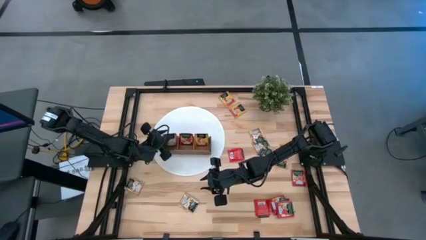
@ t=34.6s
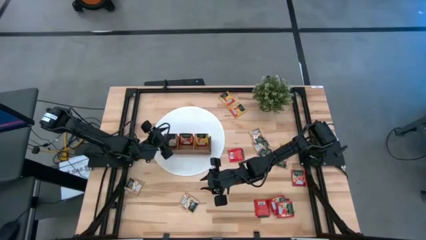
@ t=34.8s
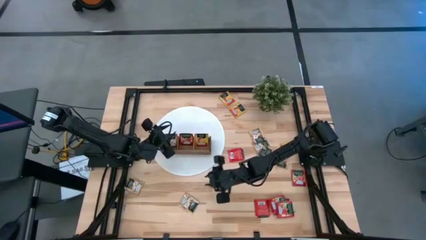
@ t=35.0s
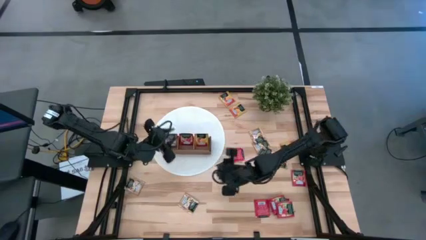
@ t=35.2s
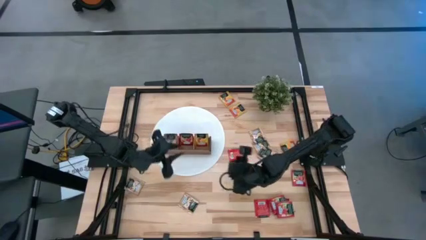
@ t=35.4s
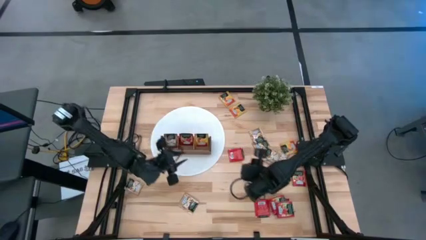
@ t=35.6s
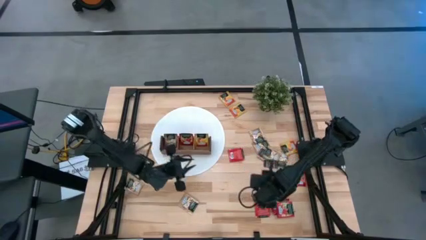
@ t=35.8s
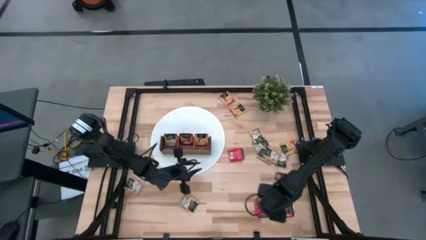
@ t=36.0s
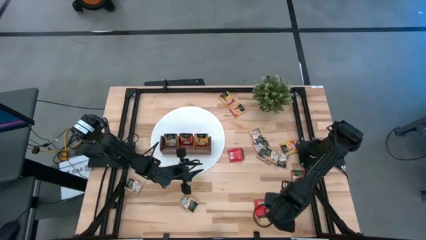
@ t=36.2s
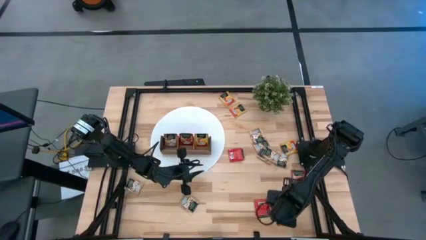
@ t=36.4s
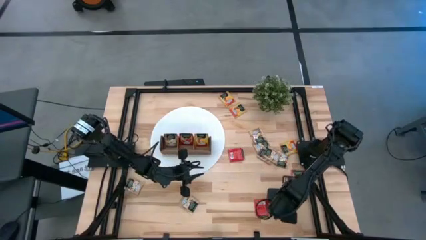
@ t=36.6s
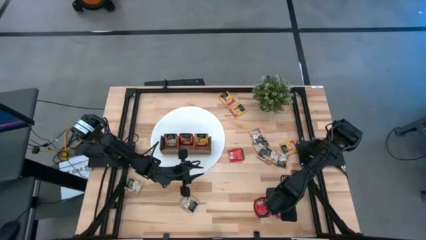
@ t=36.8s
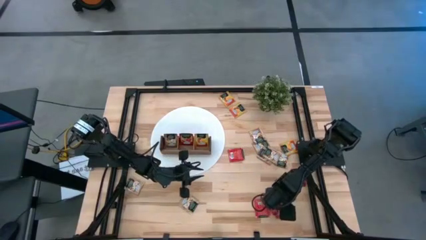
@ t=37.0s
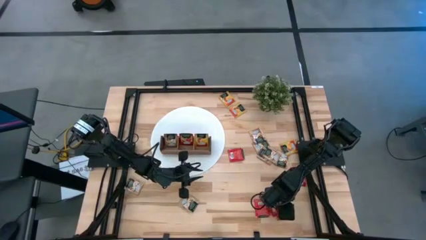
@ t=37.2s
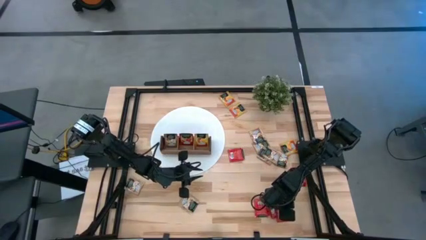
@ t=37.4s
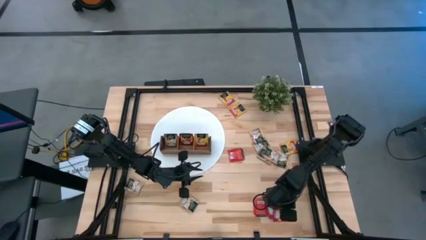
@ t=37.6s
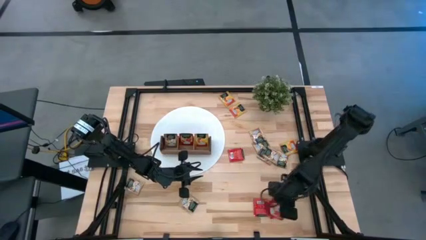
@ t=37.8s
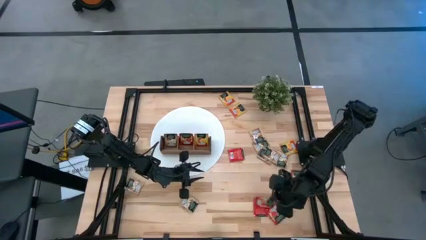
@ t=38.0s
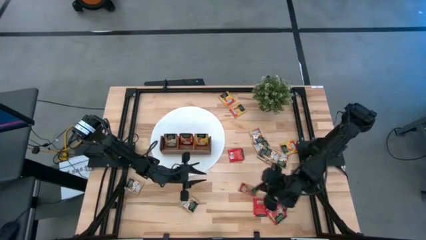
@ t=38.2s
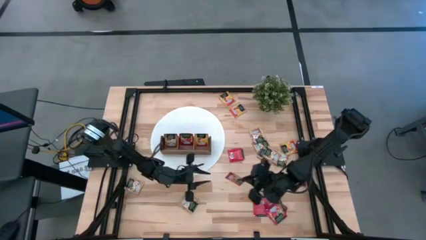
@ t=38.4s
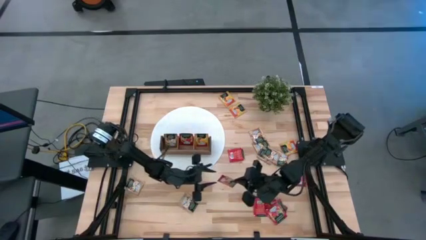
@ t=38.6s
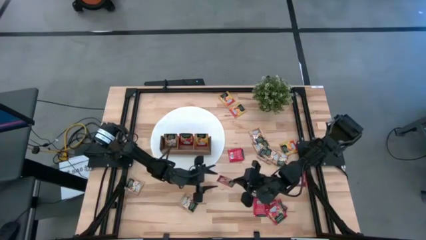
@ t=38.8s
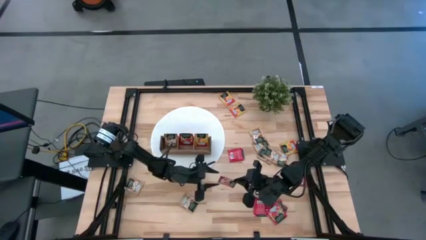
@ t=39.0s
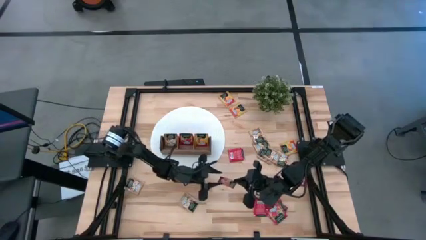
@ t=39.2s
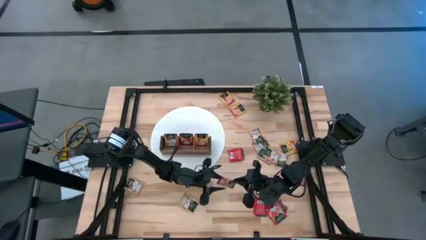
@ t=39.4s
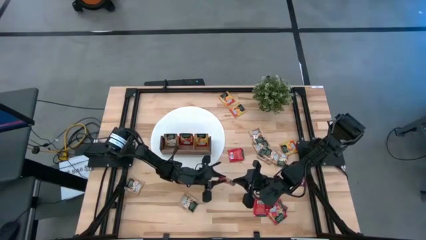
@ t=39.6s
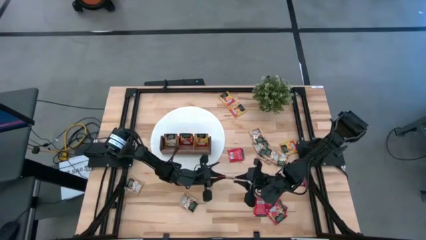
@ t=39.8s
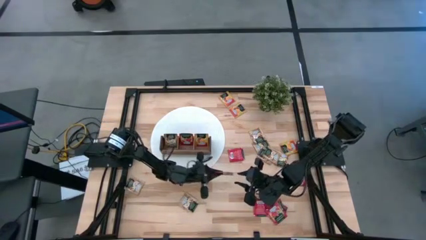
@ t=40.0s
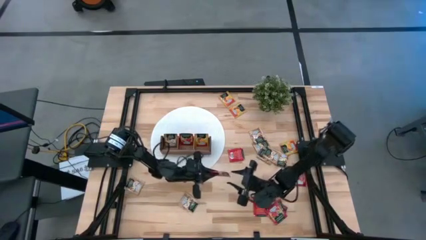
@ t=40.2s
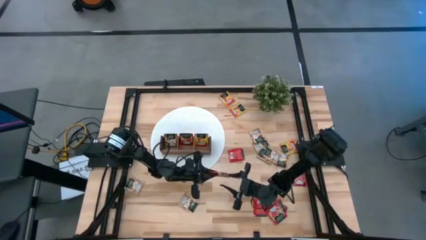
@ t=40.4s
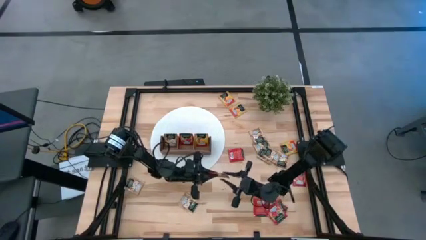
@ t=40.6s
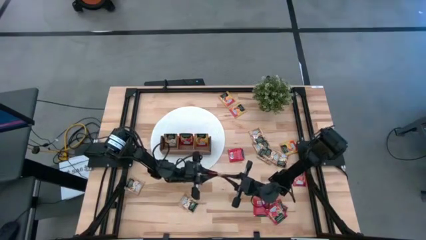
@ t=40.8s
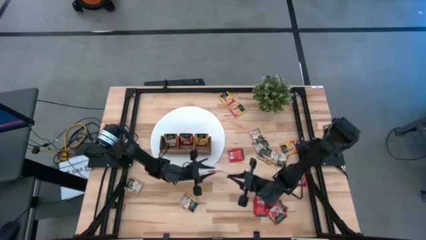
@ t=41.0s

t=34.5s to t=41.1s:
Task: Pick & Place Tea
Put the red tea bag into the middle section of the wooden organizer

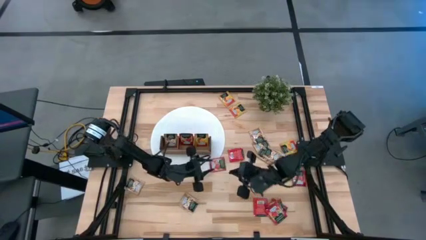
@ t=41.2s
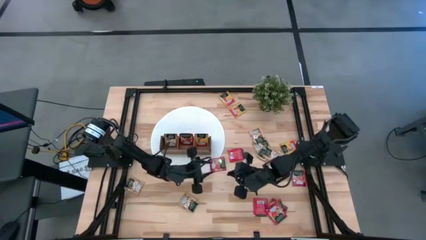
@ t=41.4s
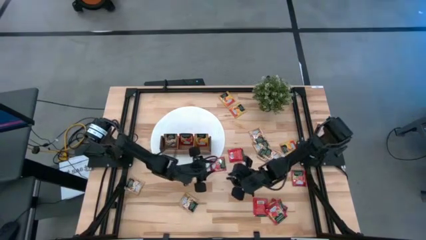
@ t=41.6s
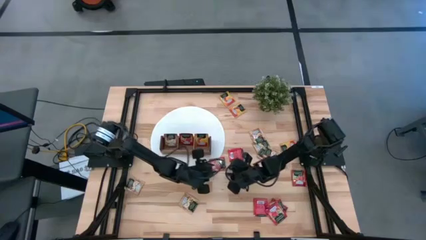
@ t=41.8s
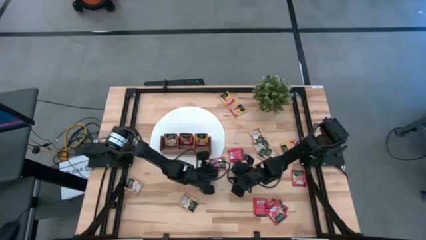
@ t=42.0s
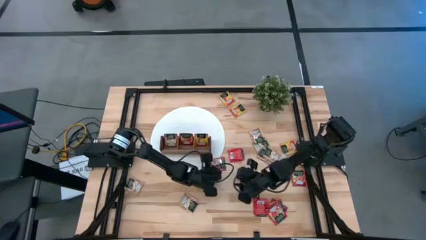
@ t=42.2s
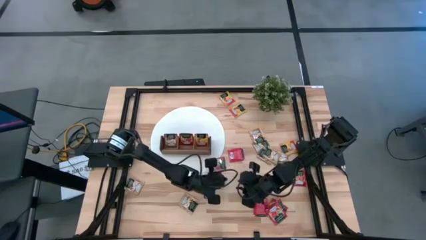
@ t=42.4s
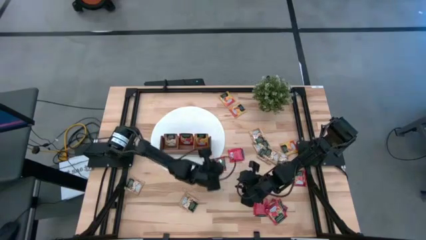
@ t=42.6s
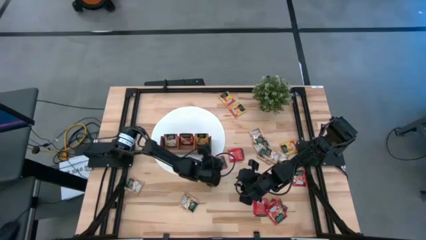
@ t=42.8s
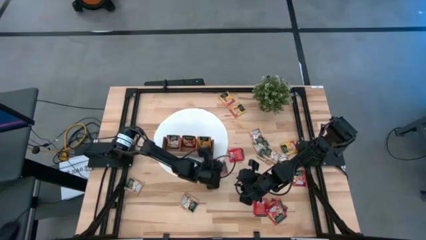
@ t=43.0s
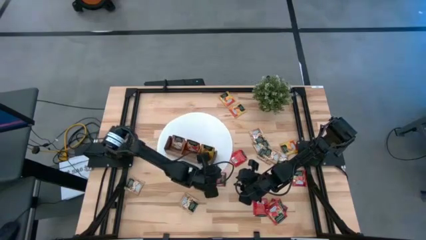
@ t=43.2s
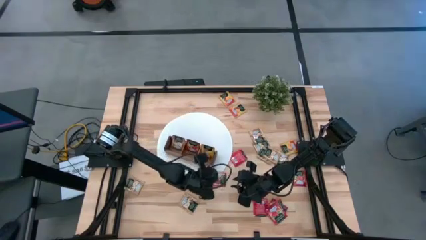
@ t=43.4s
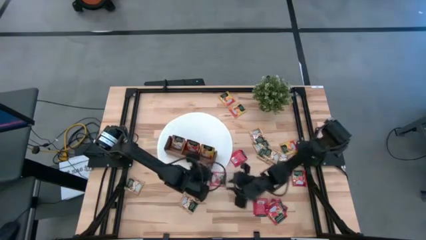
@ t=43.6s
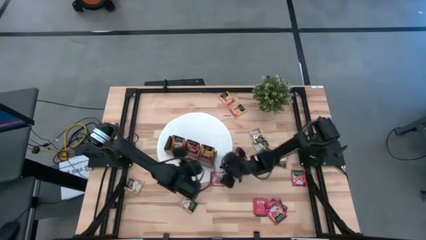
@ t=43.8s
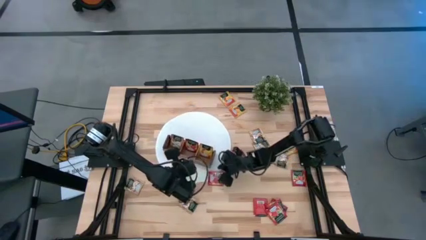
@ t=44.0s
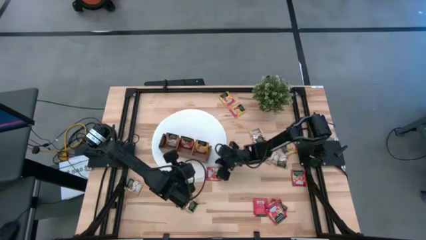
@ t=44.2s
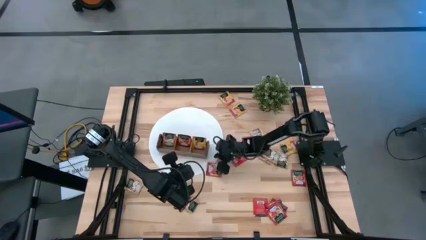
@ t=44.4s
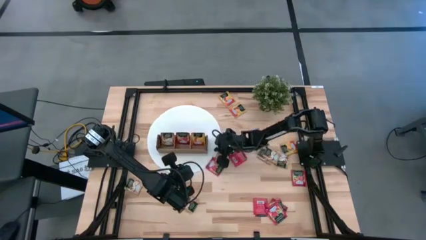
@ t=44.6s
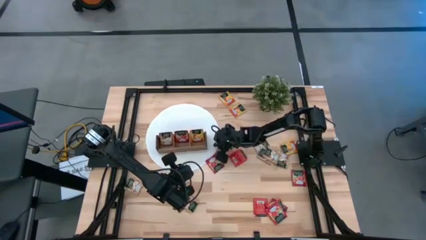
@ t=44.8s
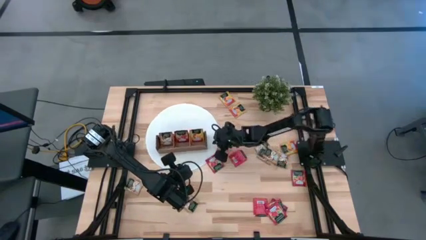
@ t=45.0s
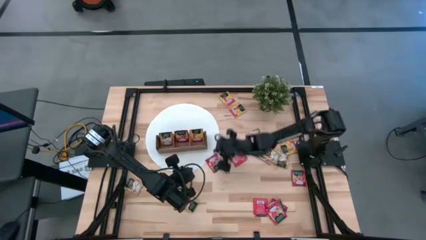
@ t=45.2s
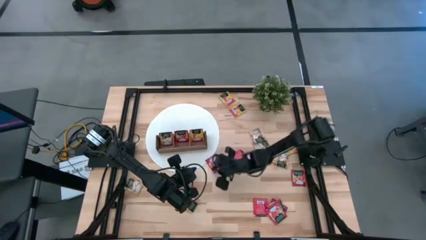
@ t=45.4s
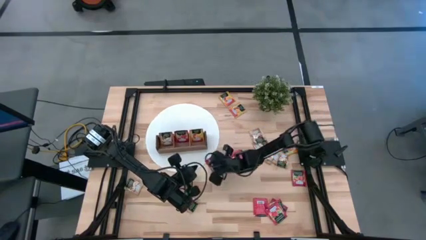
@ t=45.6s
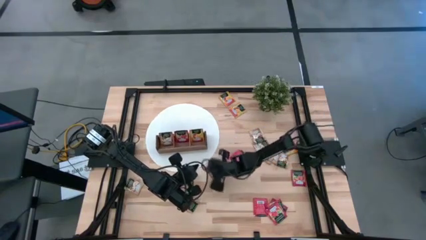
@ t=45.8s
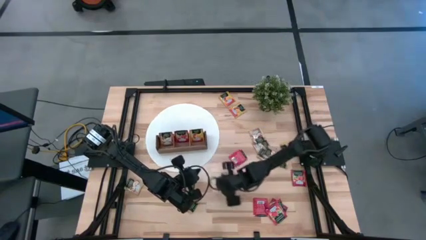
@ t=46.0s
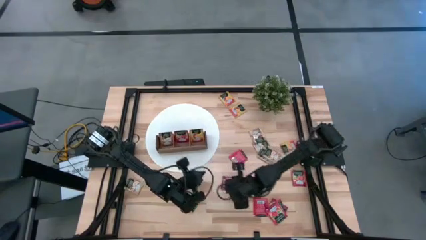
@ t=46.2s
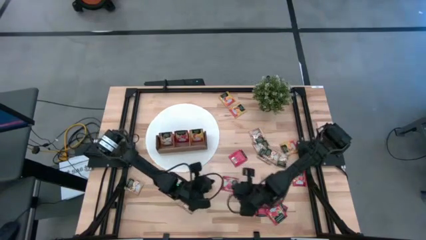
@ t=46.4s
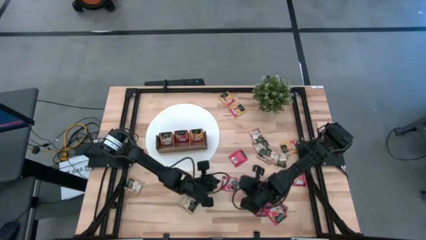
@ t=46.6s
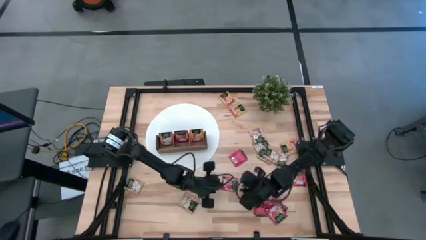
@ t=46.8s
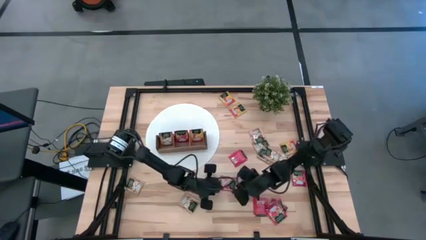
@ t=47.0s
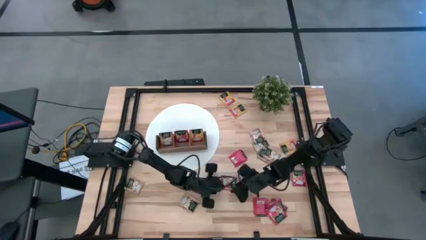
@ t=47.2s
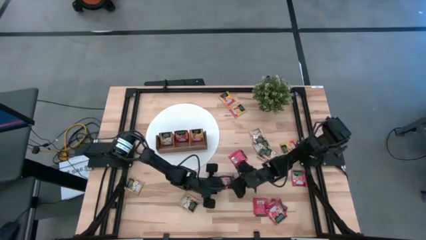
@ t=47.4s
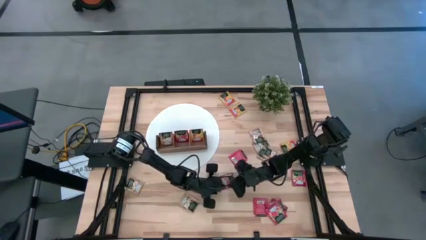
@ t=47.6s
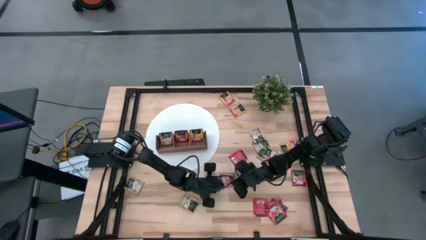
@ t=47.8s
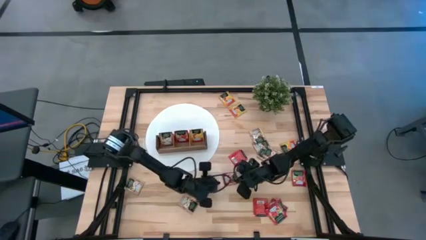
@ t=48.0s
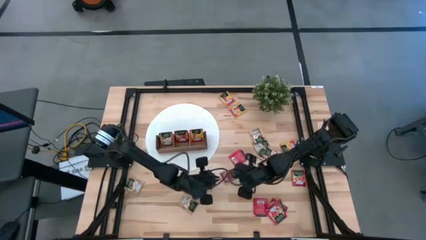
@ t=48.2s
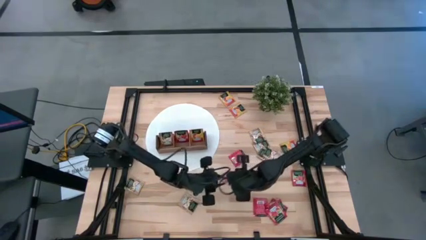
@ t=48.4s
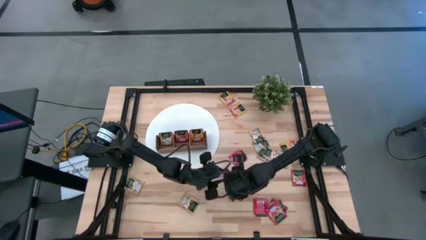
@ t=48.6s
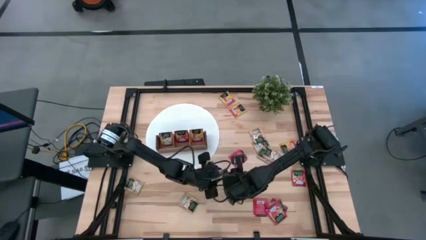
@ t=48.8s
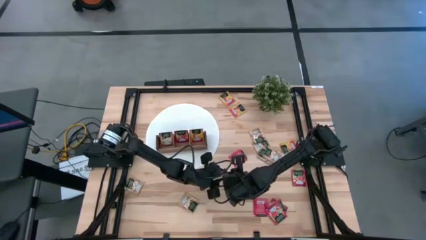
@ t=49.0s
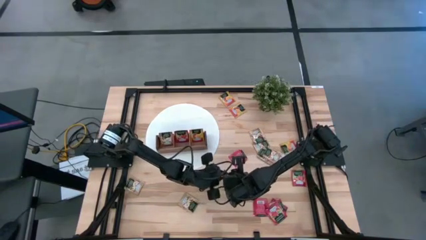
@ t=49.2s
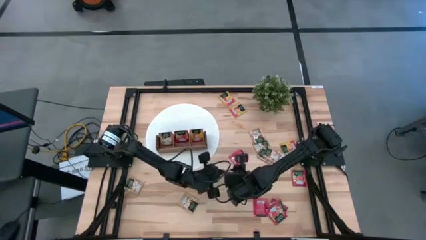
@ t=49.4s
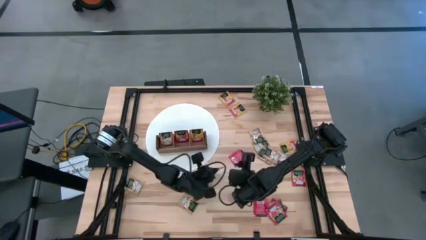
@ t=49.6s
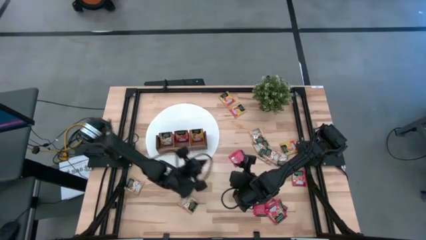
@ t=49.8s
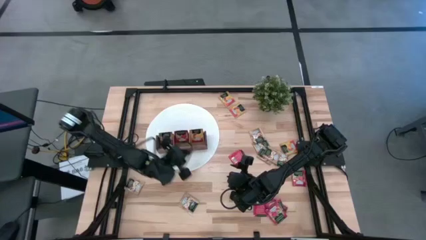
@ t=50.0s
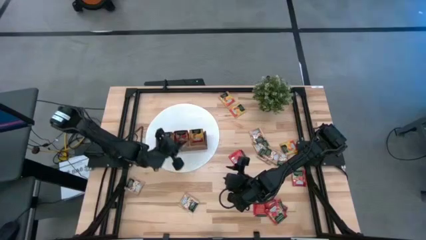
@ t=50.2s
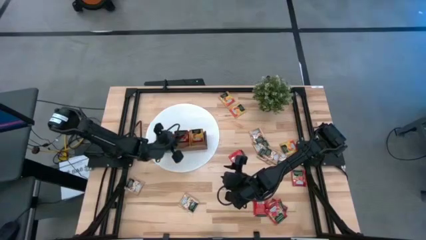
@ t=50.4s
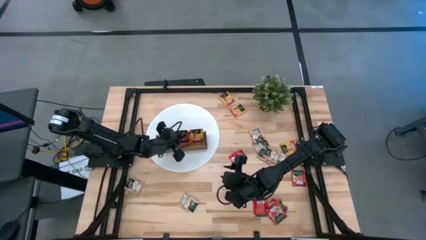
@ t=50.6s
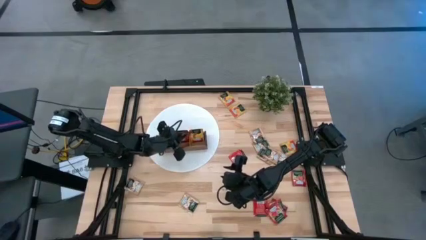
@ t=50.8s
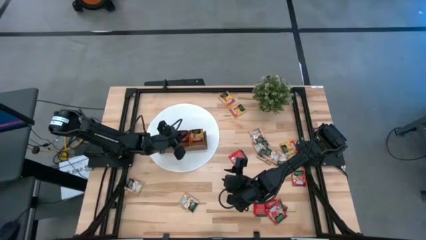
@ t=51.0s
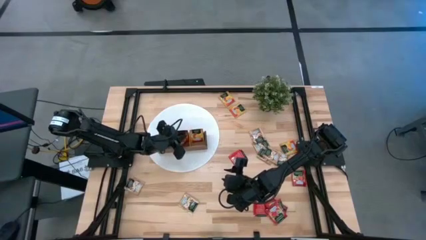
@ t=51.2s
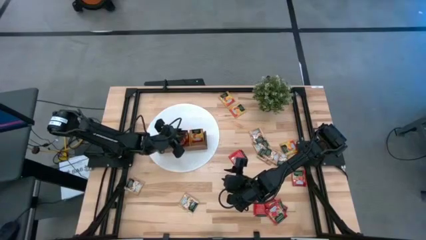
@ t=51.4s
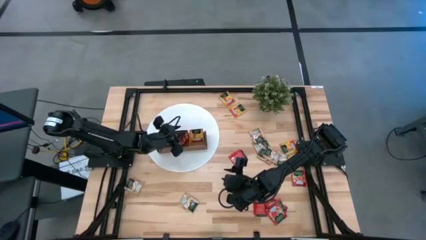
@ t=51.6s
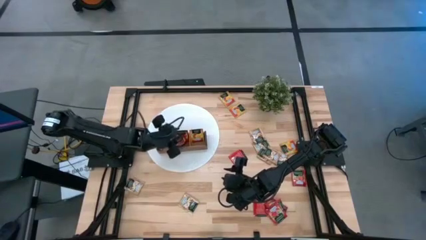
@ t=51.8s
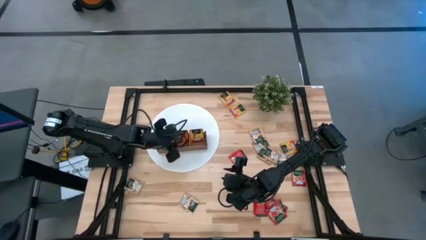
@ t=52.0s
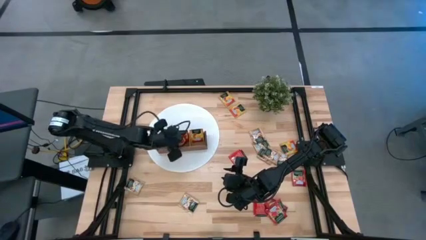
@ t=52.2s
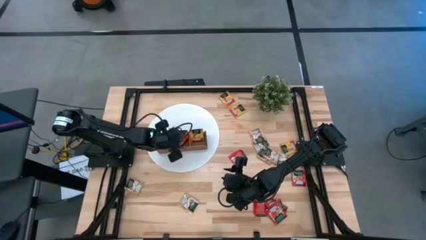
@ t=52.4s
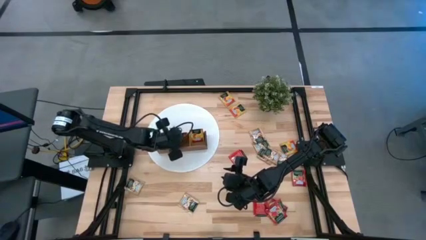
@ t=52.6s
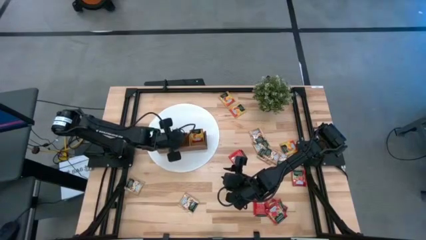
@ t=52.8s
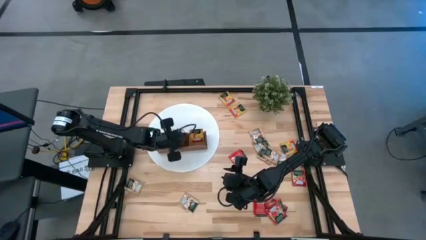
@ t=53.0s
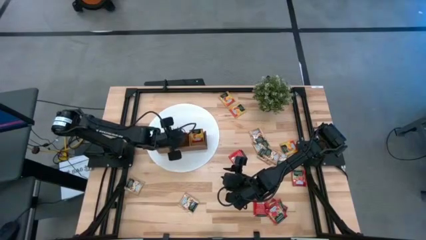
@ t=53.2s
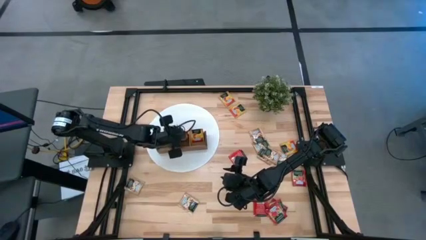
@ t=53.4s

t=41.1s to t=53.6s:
Put the red tea bag into the middle section of the wooden organizer
